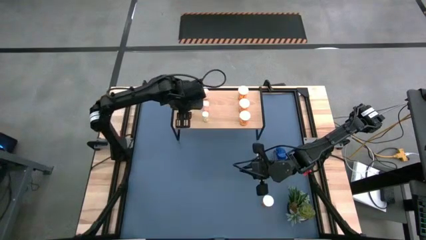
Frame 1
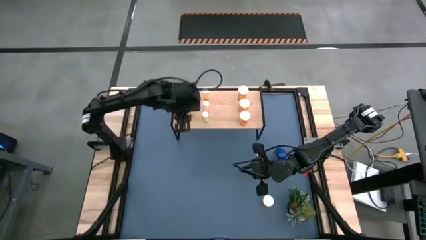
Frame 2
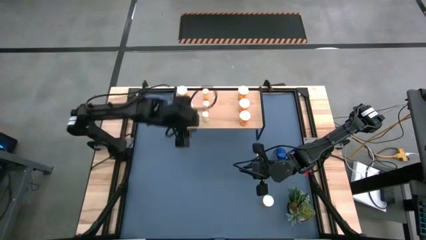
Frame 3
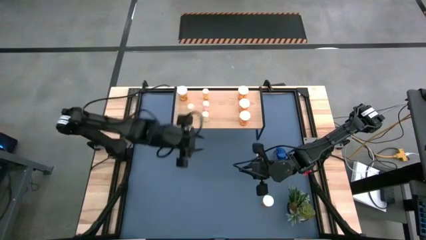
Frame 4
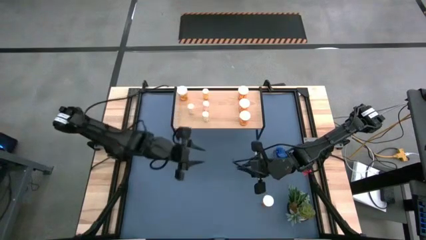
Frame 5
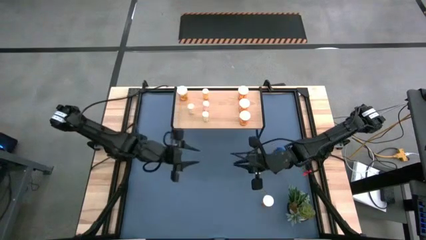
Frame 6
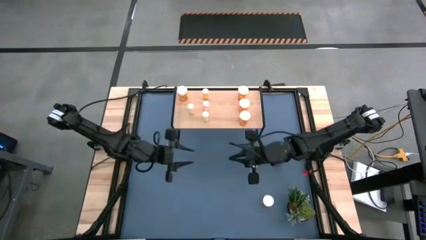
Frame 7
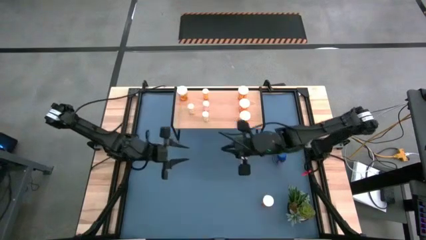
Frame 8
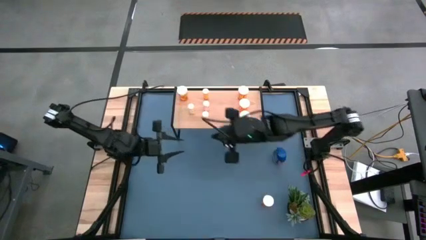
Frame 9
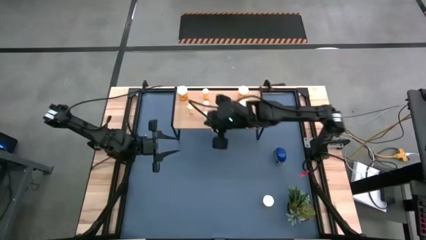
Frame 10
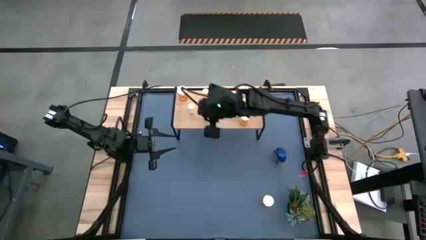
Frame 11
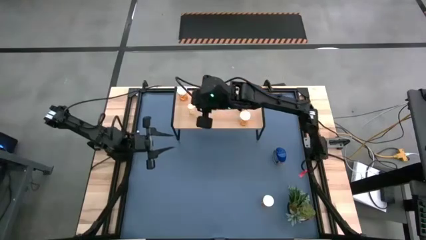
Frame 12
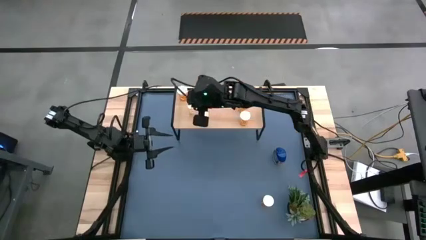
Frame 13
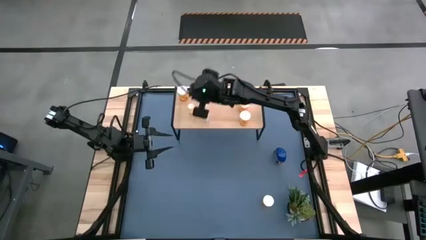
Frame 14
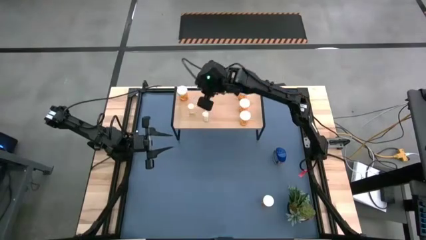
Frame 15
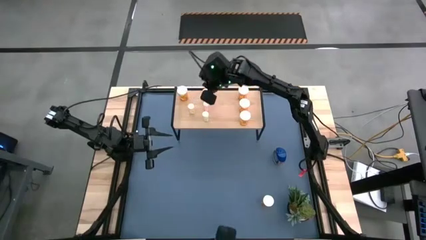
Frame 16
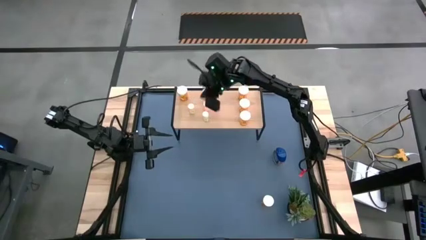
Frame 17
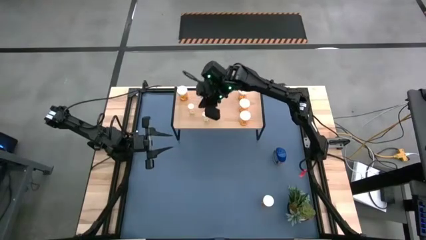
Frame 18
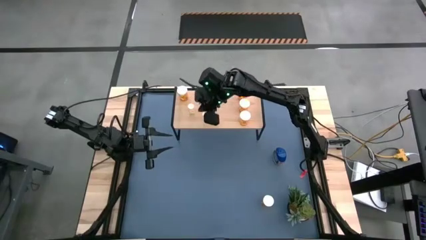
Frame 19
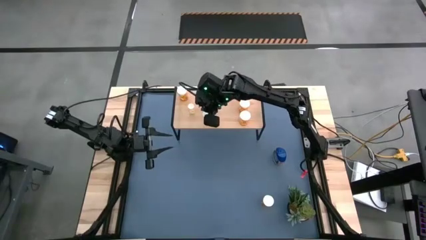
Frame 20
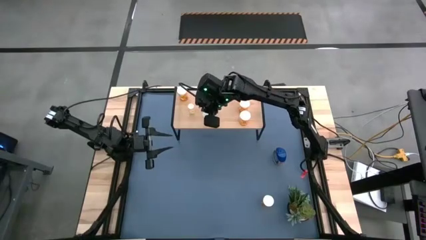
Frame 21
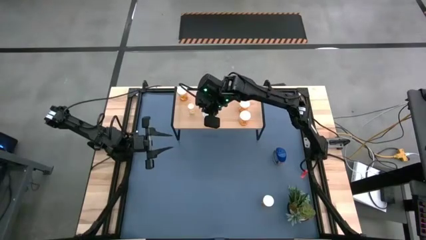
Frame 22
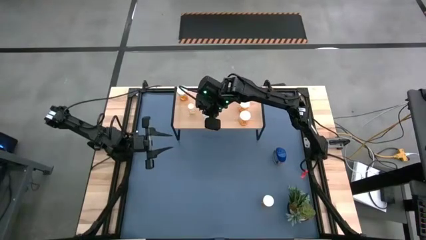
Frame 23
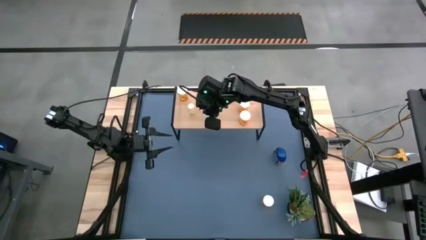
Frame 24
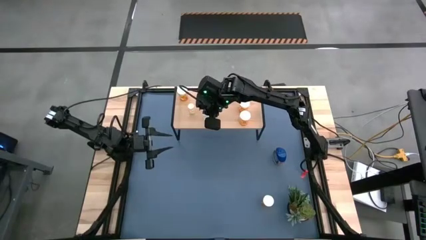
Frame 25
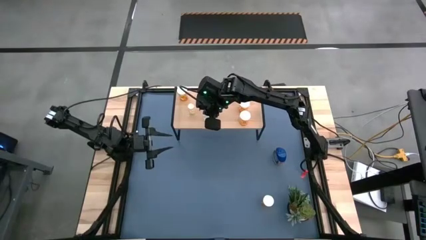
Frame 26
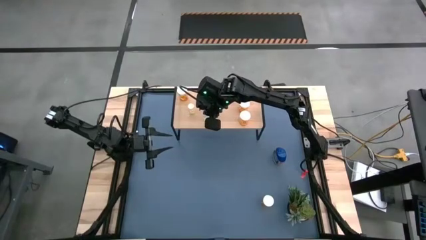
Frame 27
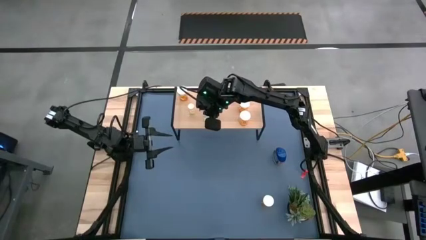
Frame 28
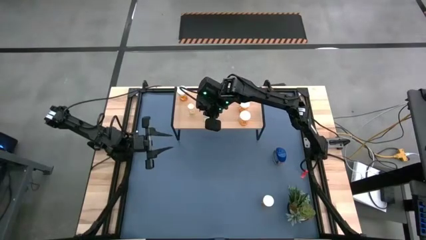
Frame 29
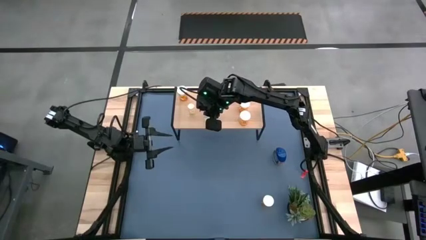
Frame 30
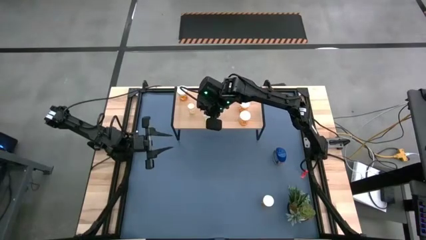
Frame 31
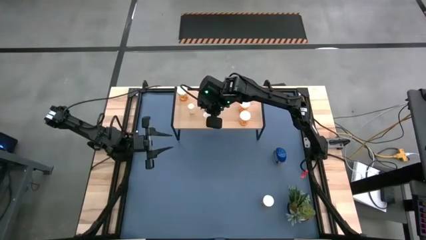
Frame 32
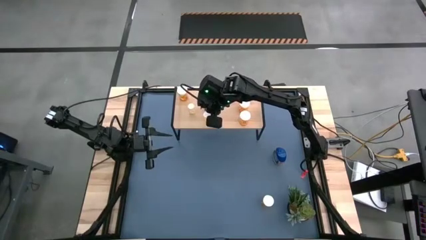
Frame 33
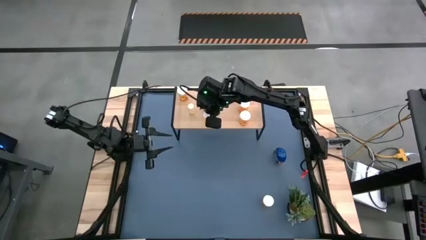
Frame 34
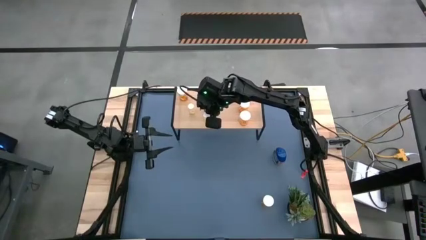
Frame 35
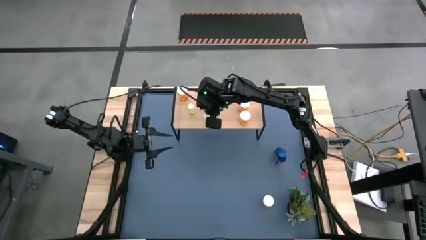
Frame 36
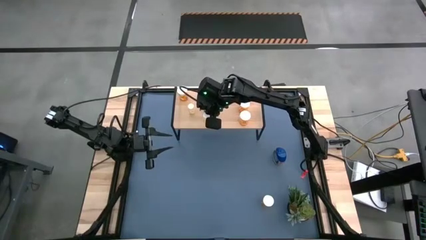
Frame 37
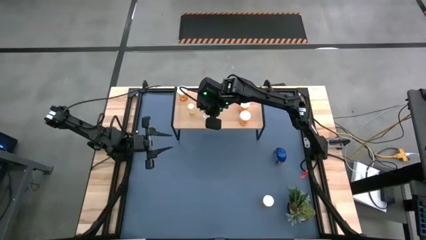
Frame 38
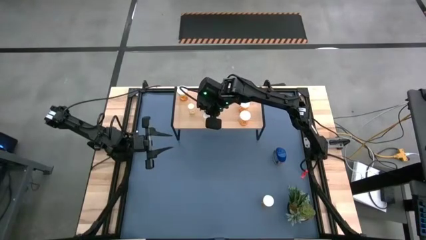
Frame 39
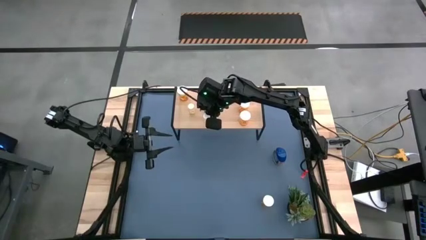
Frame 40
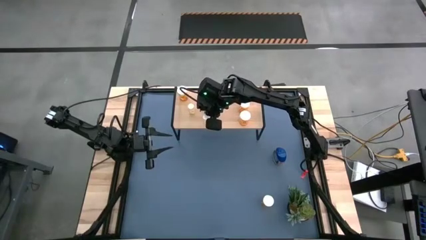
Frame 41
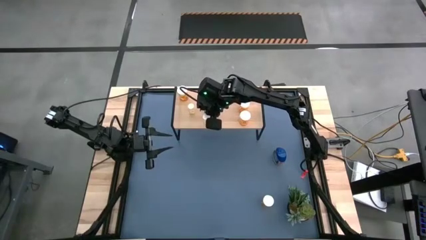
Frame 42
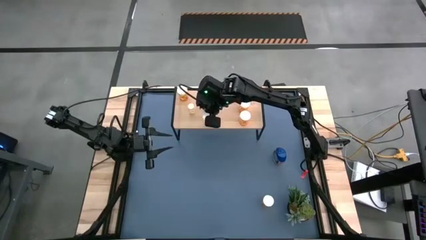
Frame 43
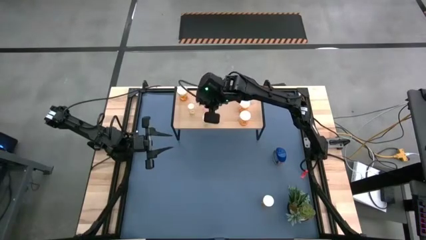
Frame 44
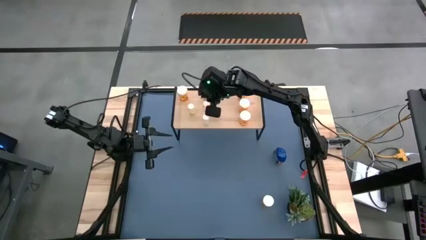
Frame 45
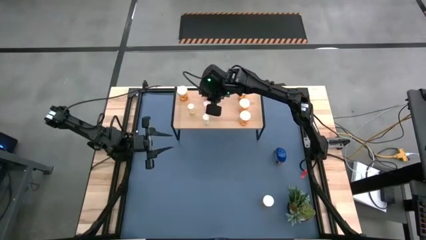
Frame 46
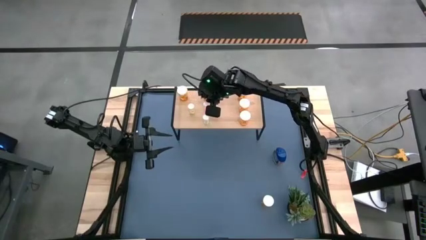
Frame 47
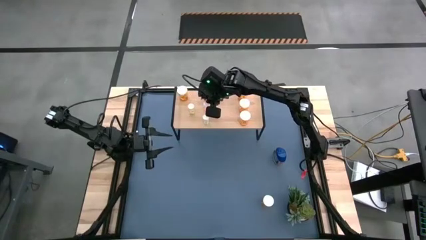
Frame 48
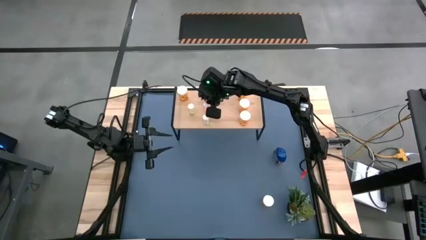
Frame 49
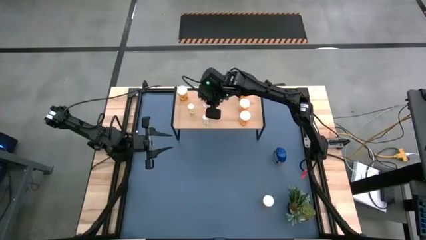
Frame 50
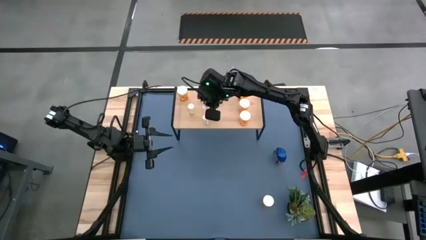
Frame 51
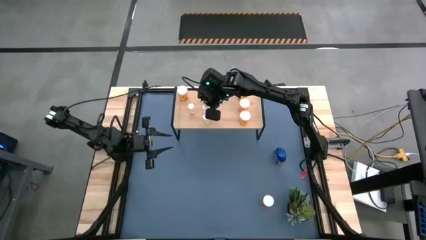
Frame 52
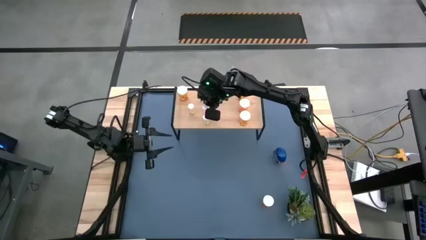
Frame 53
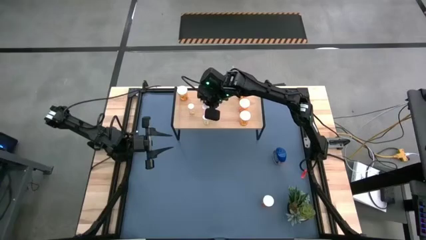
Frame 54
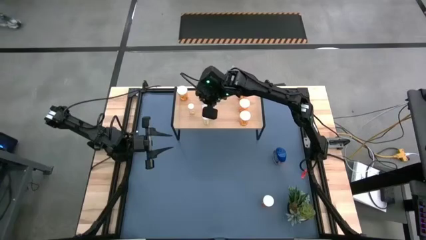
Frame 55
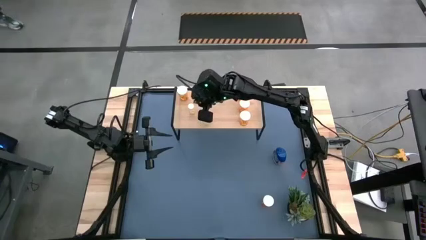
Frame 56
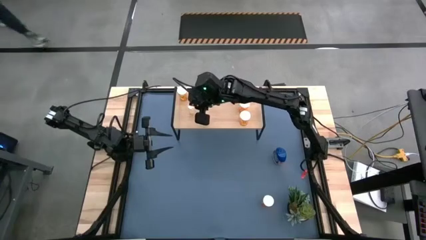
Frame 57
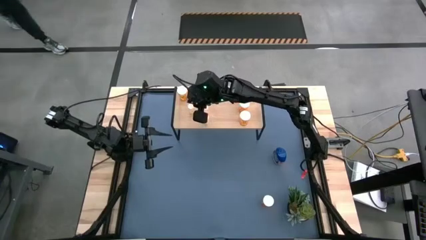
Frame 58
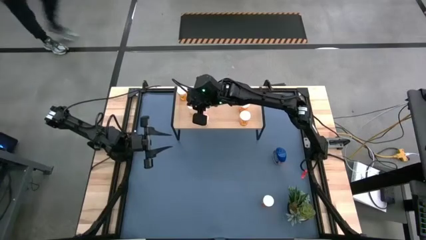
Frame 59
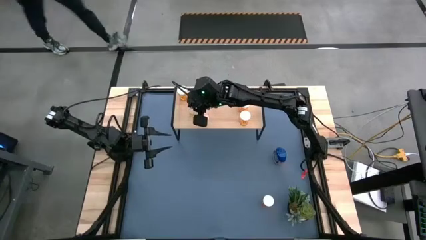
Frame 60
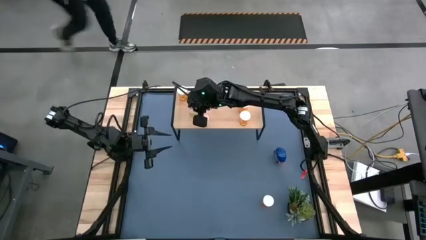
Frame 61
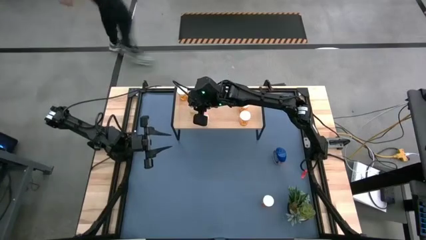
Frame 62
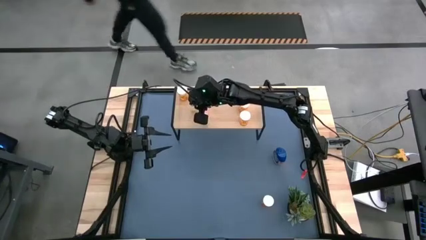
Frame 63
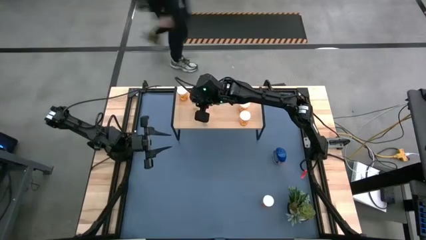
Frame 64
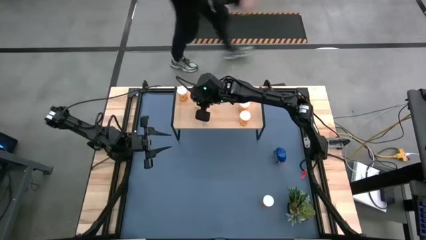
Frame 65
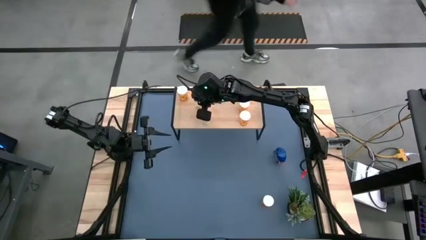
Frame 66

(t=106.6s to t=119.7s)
Task: Pick and place medicine bottles onto shelf by color
Adjust the small pill bottles
